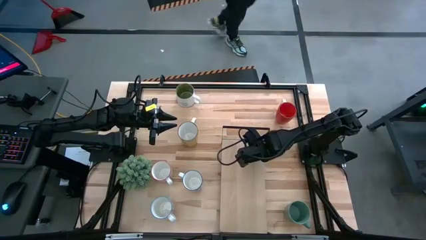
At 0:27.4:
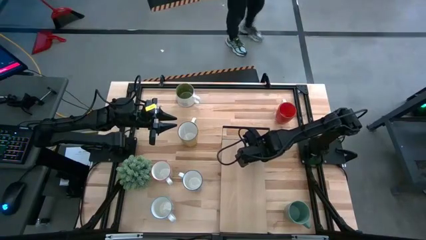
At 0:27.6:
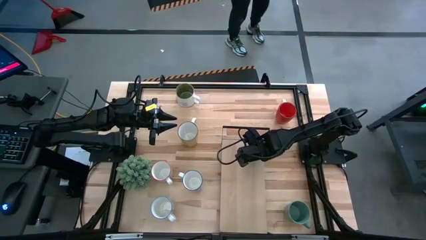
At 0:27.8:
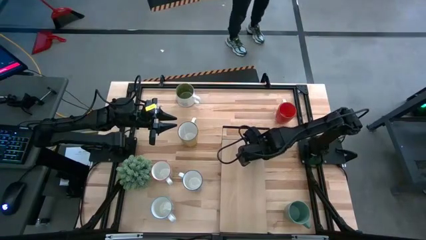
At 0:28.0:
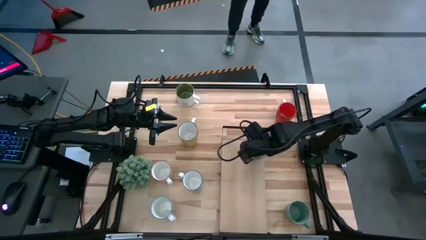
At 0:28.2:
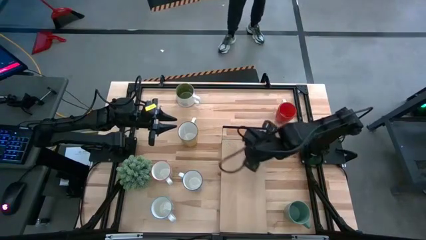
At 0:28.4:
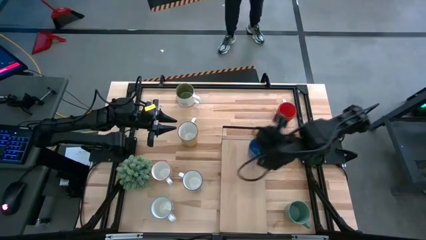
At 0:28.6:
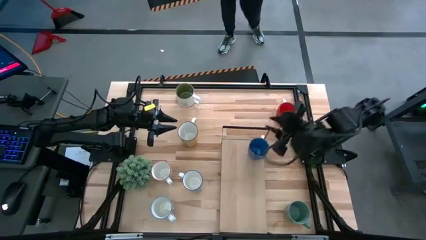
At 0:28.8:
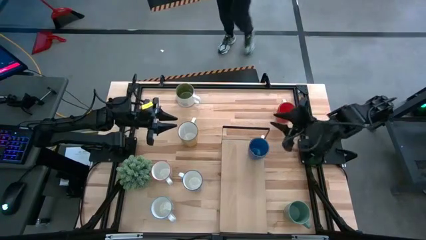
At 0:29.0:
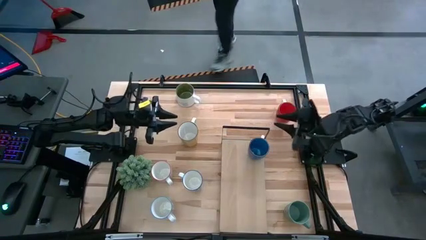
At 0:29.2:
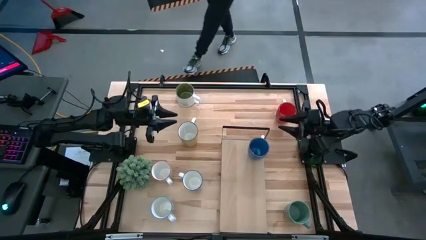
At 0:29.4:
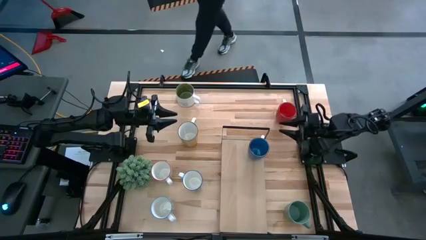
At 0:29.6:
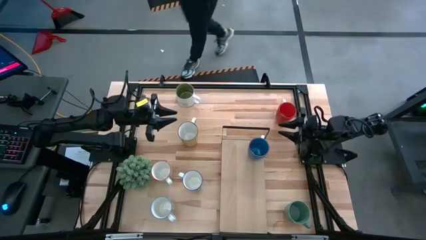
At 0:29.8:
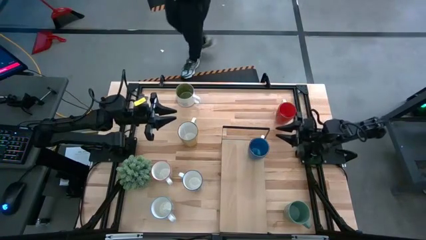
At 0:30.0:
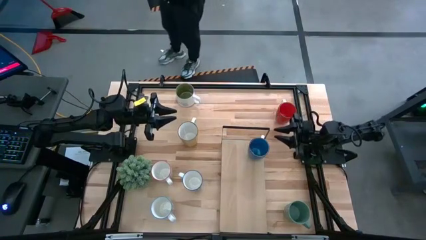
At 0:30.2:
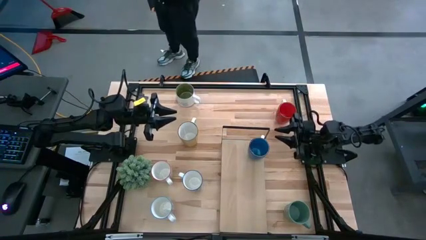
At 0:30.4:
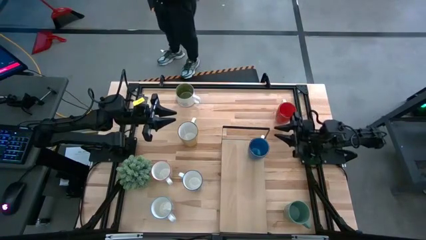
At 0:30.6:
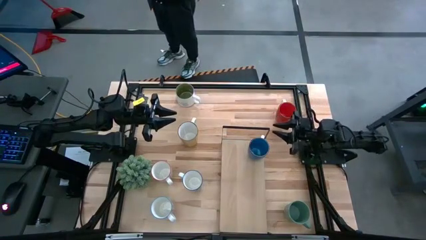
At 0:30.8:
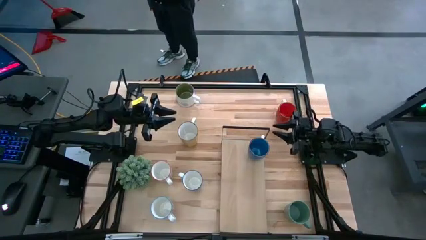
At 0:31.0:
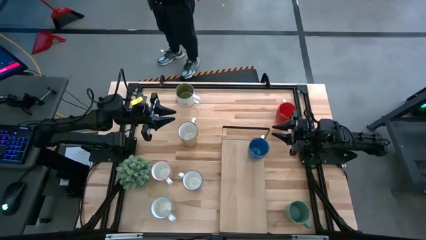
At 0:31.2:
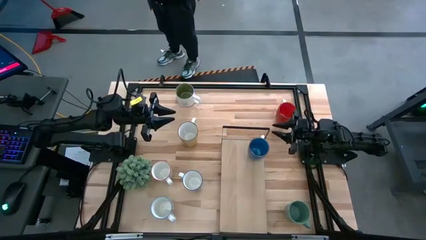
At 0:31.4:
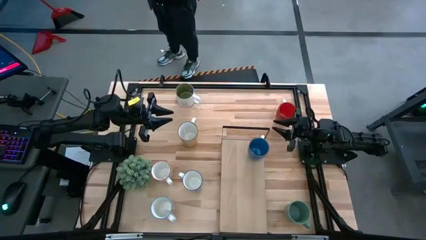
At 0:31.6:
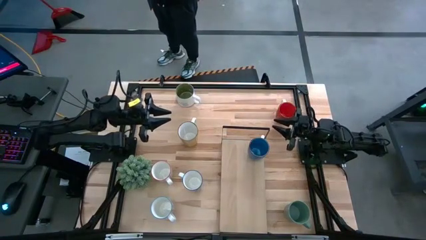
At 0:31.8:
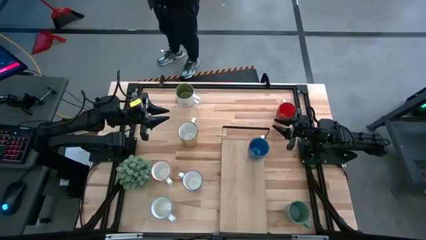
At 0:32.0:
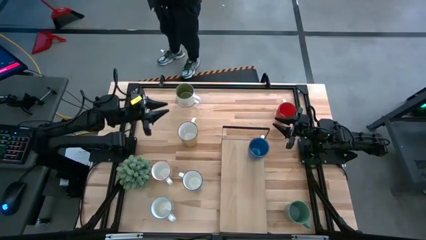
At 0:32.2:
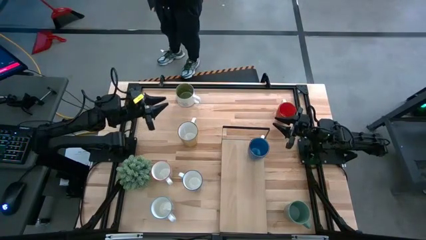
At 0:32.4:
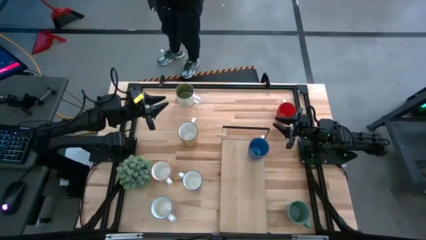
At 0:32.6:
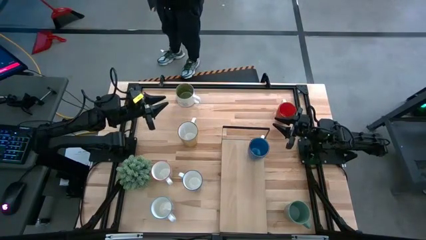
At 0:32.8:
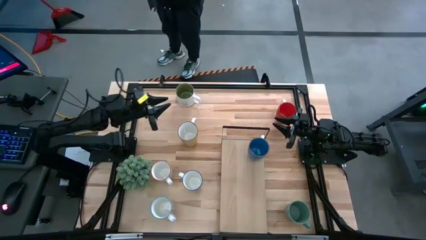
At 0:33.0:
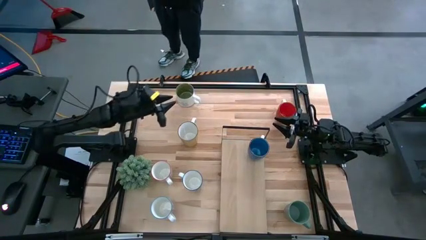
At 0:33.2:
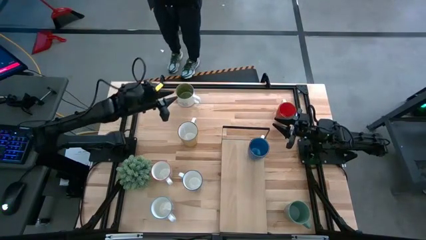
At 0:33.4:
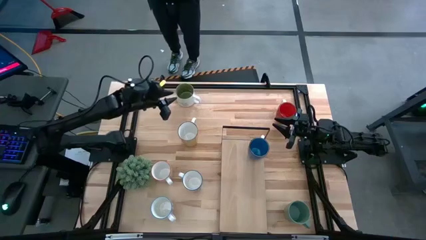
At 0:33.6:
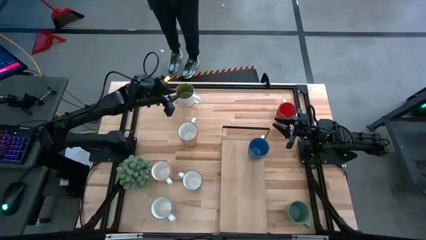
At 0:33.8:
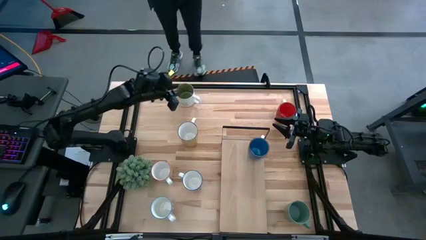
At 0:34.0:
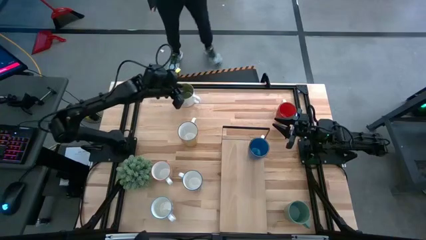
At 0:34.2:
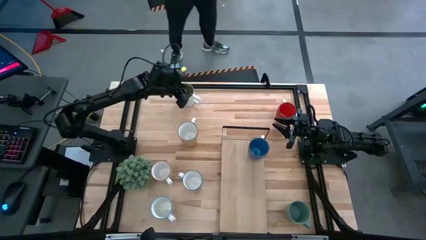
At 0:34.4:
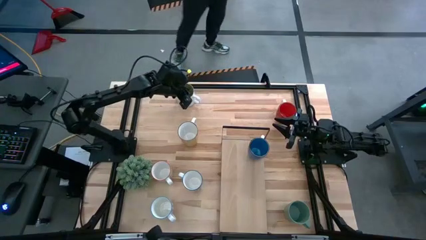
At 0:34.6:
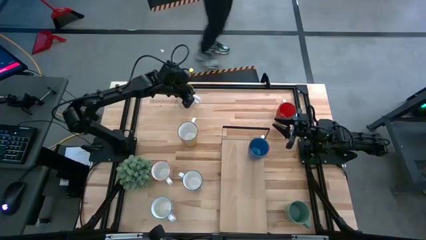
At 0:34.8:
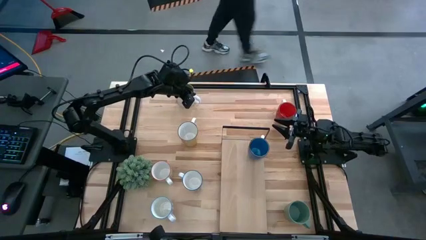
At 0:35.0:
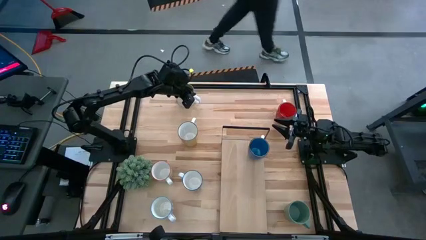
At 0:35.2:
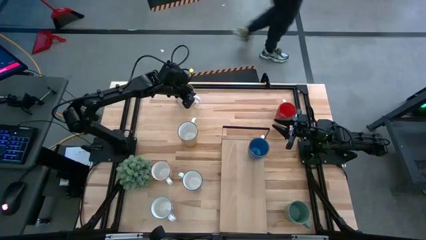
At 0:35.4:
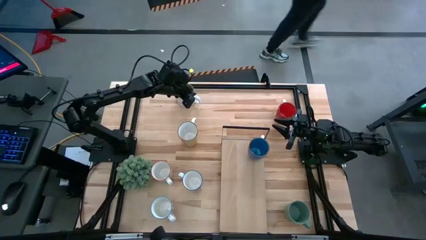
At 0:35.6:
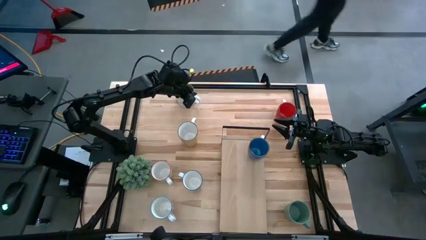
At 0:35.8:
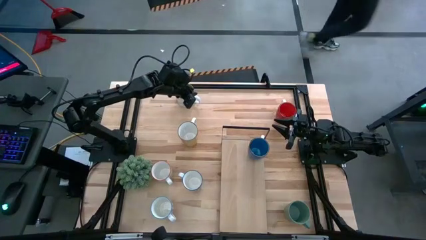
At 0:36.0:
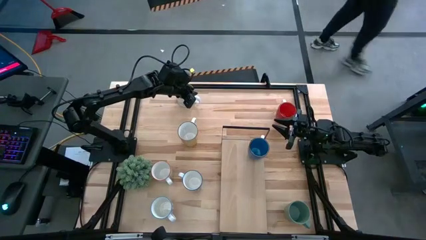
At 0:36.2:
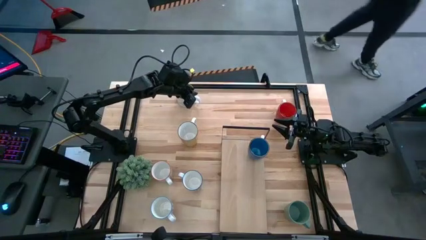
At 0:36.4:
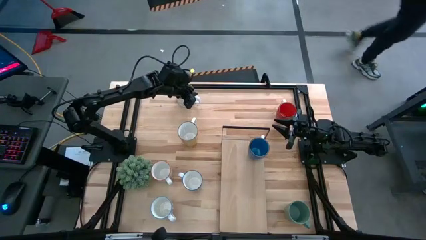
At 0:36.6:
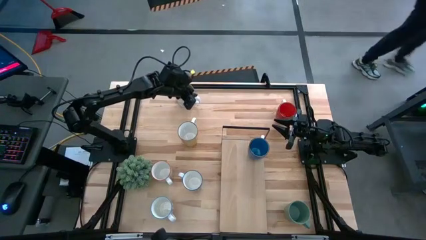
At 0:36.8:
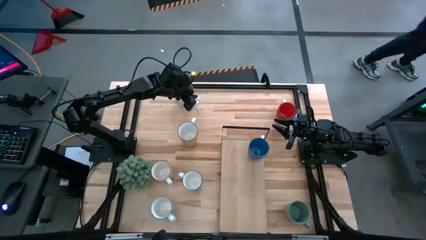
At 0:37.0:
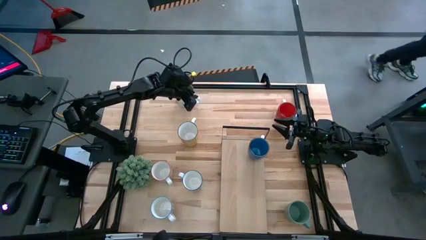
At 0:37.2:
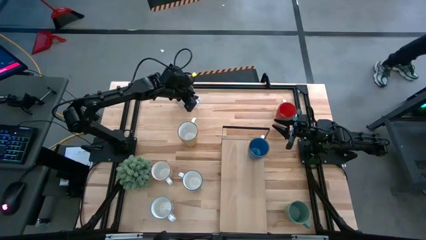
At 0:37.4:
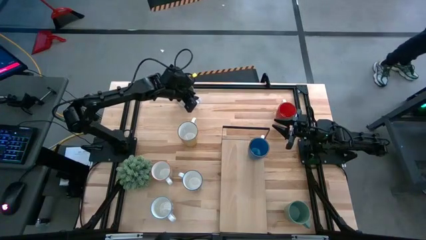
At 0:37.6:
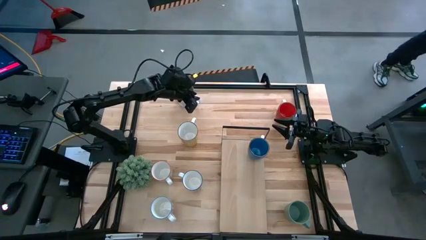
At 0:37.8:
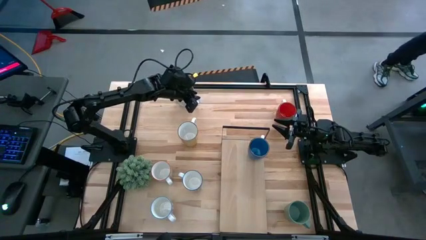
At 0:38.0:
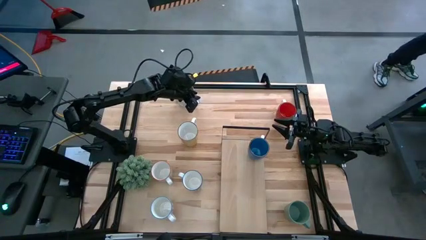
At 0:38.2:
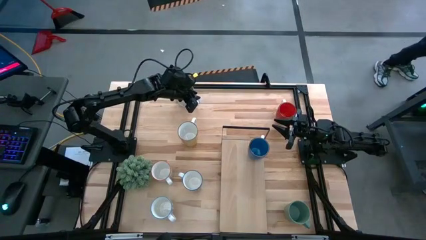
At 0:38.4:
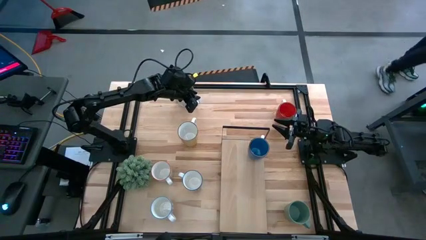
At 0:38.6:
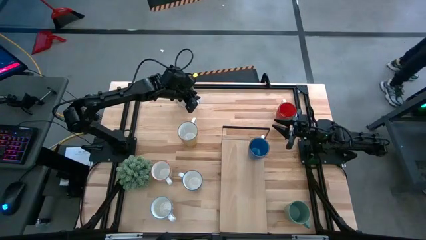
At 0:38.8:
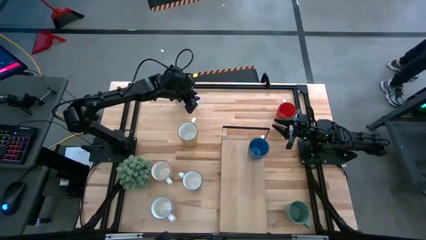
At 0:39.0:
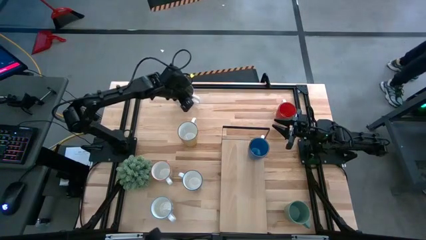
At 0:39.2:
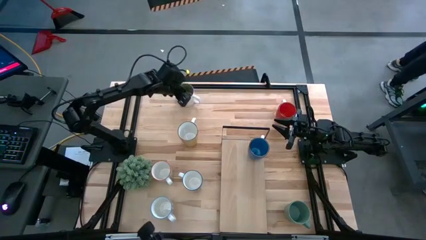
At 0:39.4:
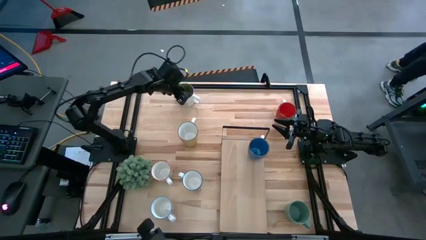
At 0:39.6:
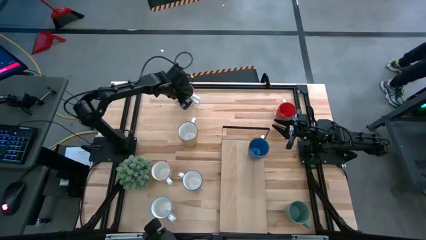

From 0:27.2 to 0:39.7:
Task: Place coffee mugs
Put the white mug on the shelf
